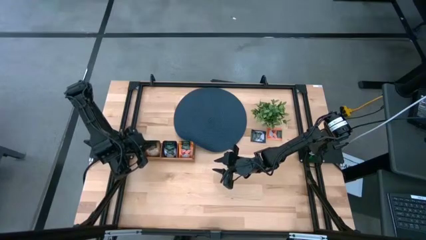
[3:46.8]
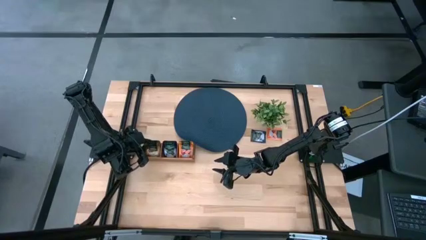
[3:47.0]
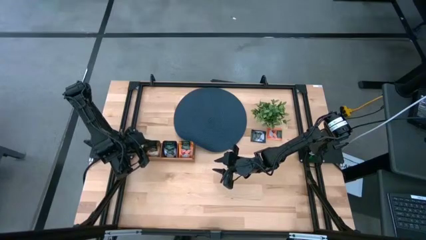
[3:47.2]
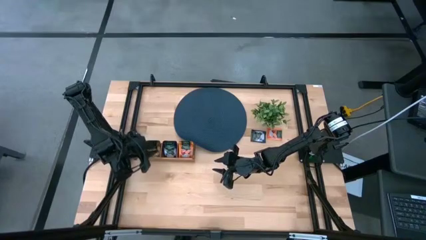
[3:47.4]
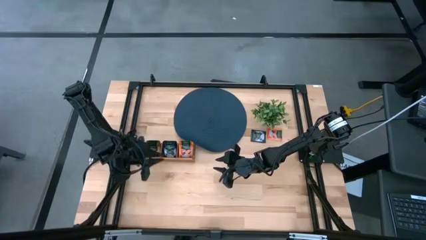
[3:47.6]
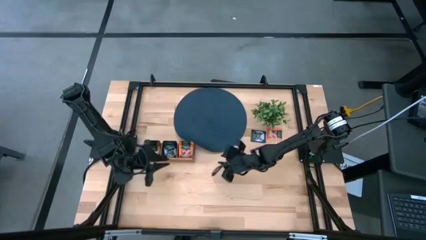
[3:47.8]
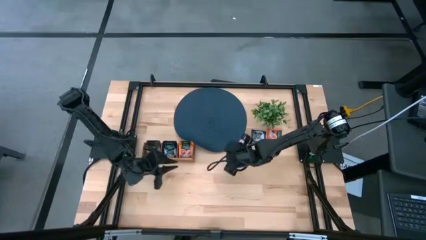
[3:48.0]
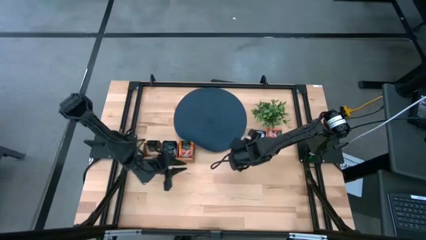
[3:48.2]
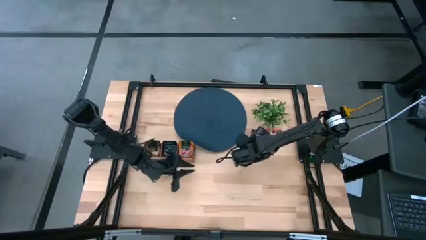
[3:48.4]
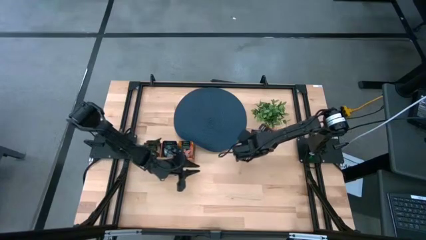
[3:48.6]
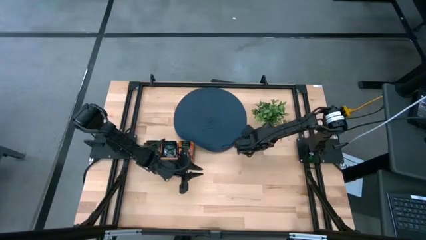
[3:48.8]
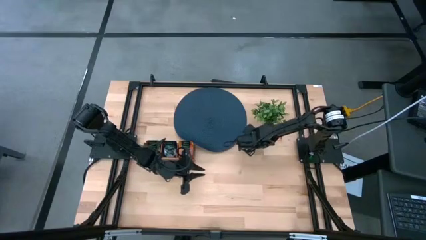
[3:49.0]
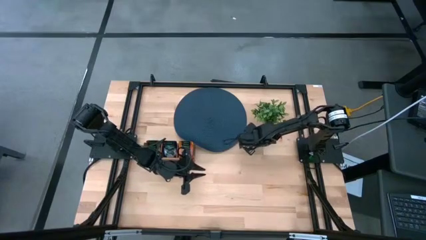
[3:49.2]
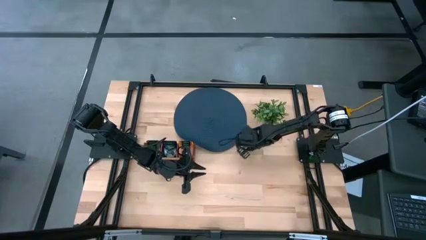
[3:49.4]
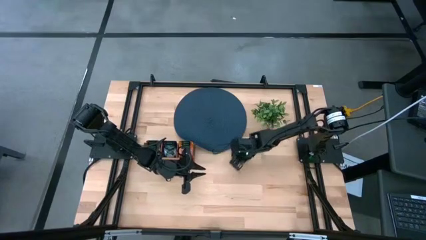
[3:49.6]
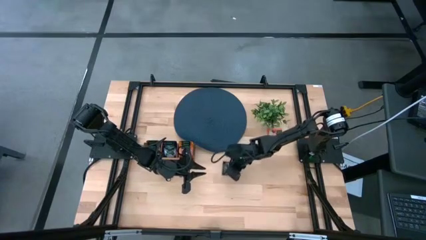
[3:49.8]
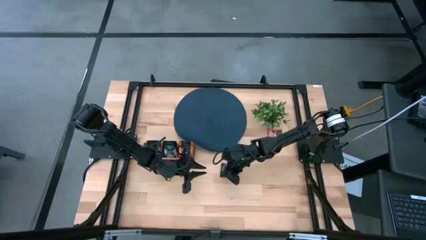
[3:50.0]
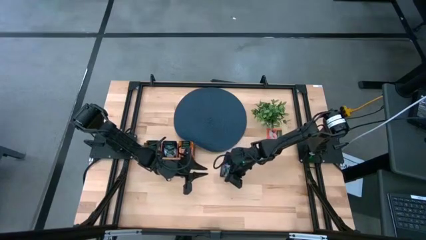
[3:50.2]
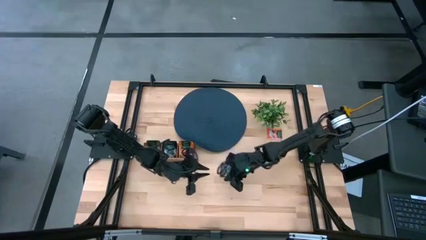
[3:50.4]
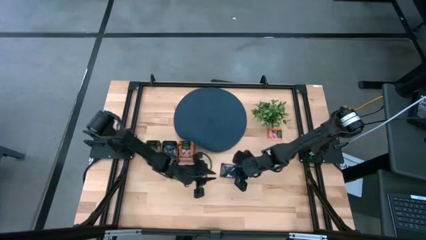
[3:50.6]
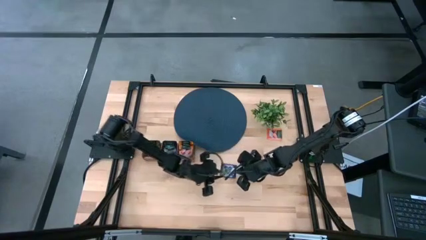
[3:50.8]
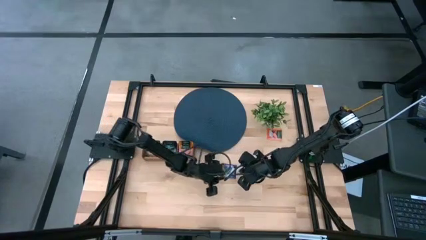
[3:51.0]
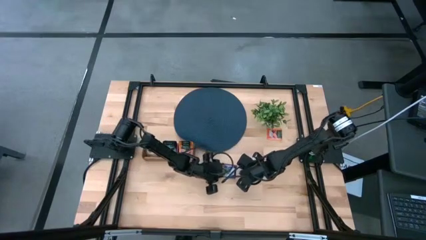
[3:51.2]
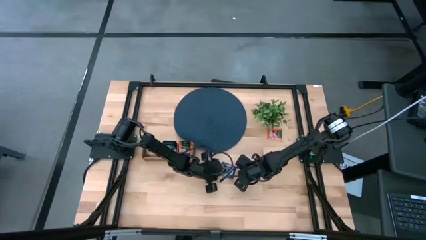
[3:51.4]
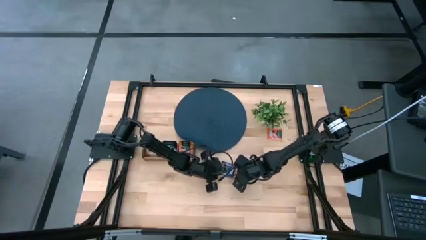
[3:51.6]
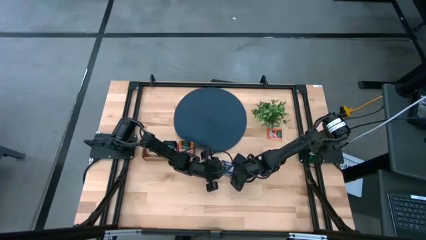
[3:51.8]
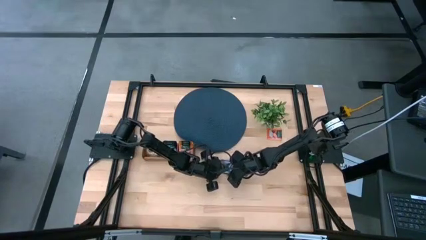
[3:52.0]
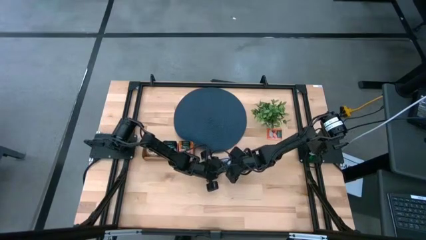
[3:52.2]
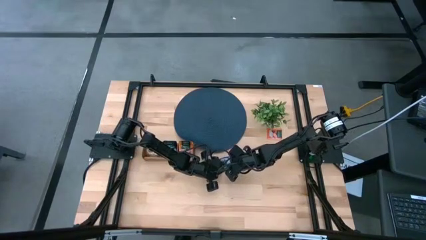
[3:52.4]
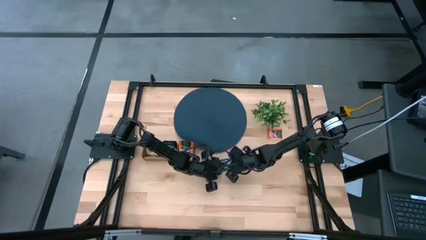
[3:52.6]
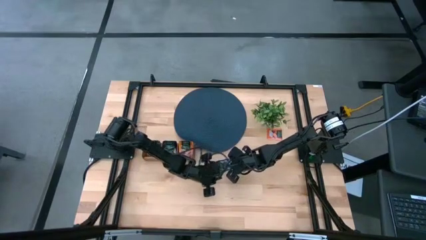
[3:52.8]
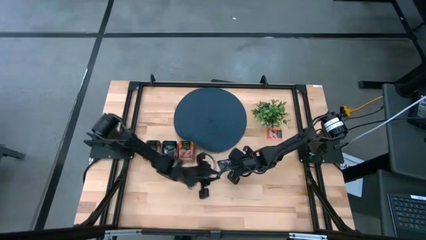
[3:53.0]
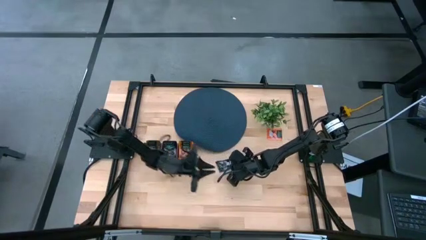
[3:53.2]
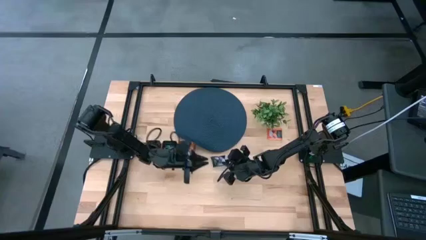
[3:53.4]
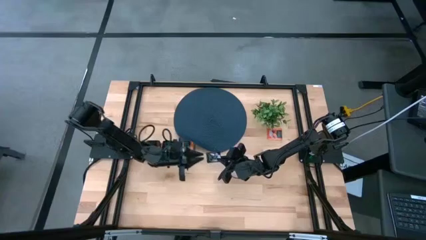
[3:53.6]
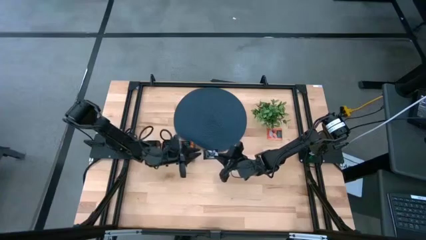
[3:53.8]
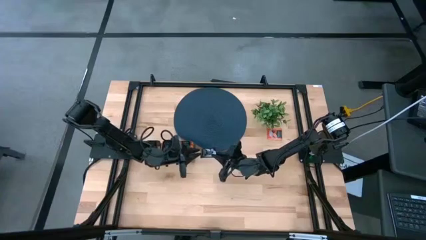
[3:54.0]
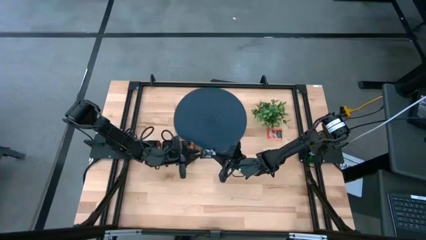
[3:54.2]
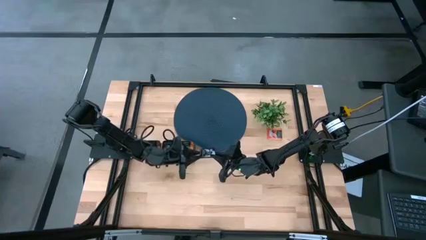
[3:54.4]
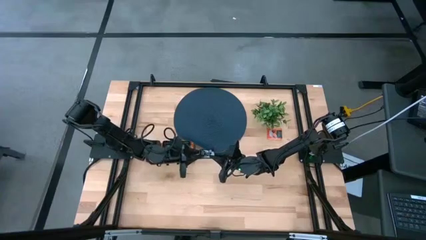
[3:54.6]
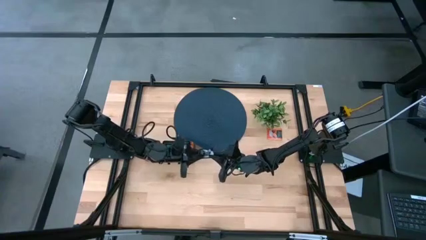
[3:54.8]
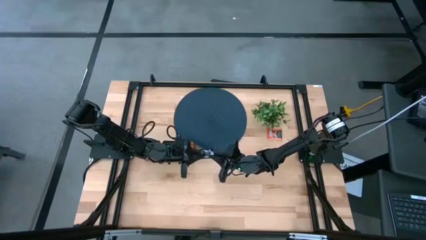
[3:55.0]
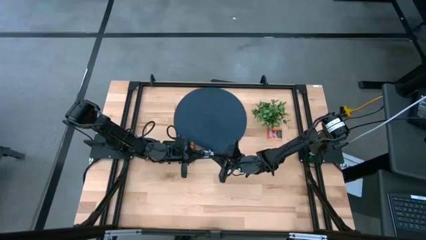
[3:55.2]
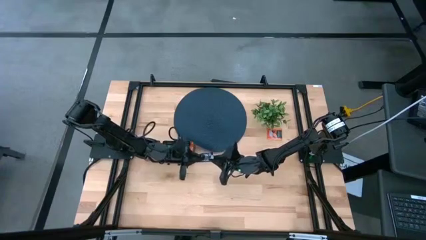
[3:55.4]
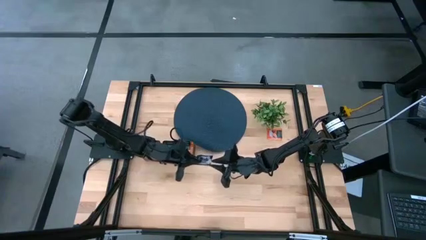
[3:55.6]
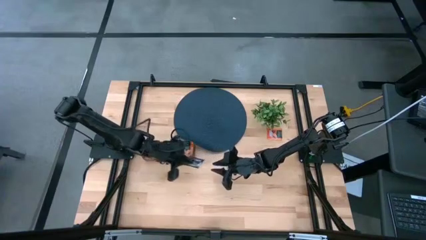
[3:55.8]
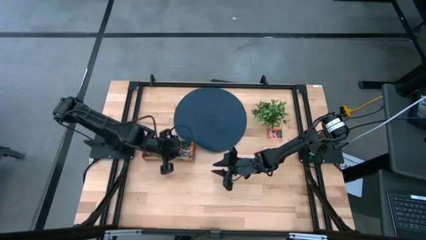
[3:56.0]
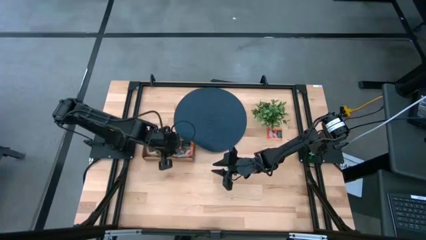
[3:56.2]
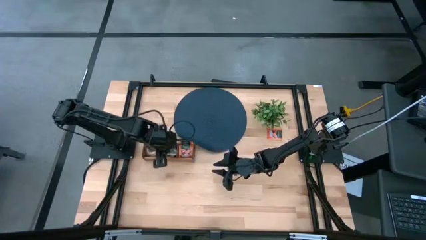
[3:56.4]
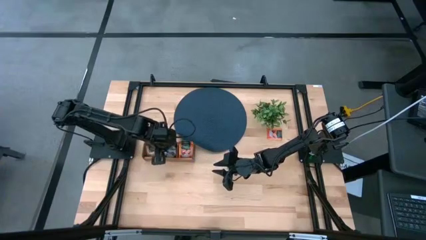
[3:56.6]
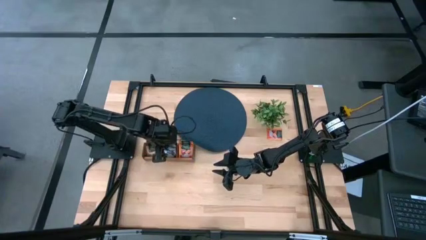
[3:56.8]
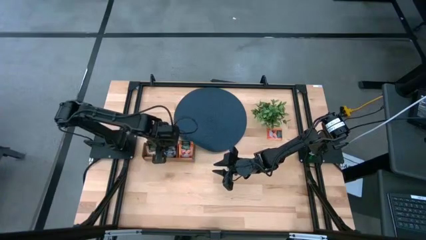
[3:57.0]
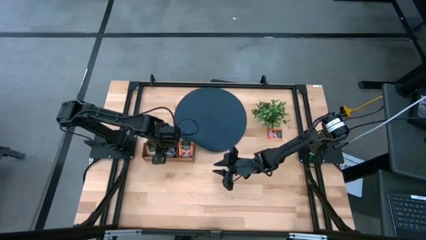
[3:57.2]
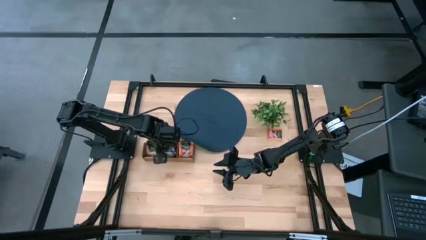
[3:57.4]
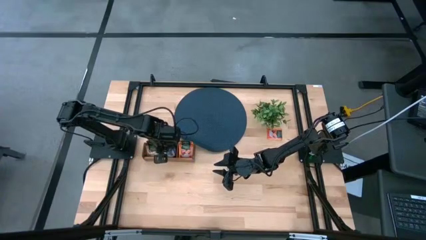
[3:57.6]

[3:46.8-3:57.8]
Task: Pick & Place Tea
Put the blue tea bag into the middle section of the wooden organizer

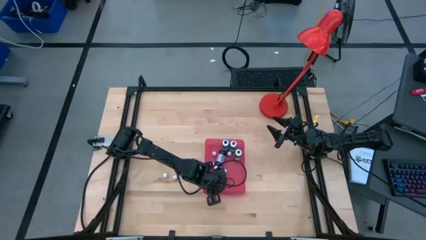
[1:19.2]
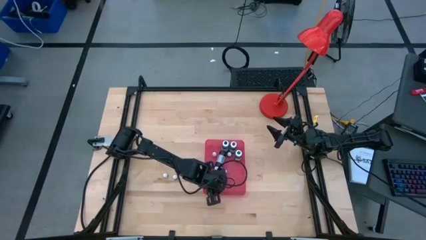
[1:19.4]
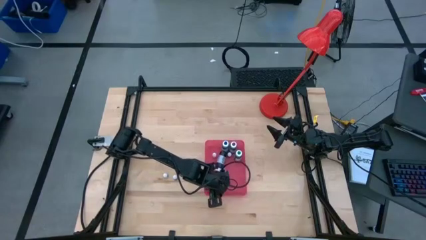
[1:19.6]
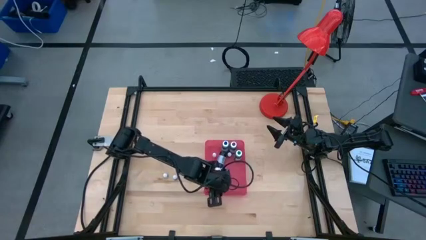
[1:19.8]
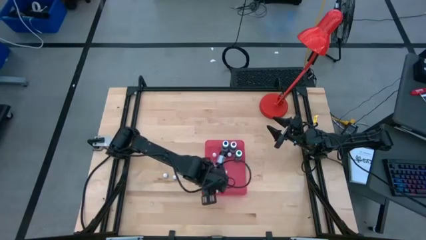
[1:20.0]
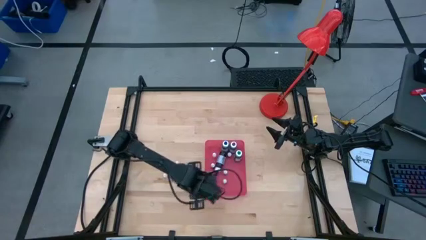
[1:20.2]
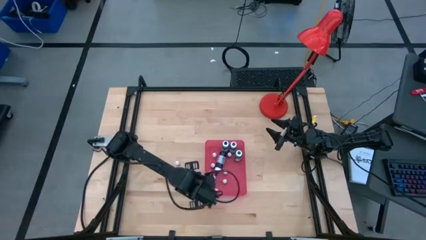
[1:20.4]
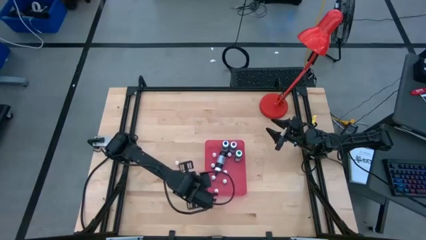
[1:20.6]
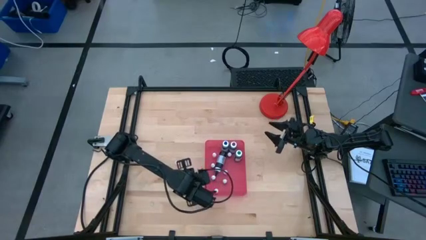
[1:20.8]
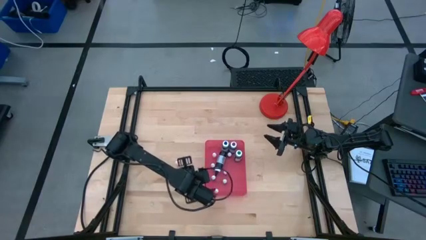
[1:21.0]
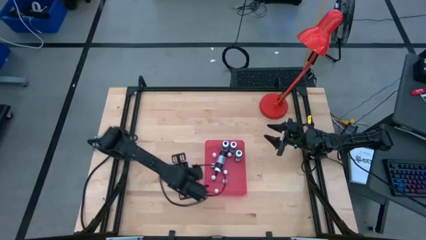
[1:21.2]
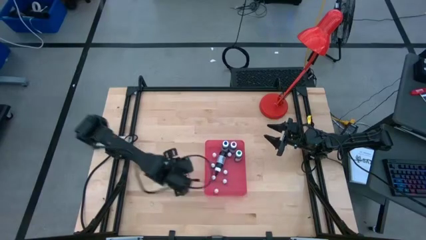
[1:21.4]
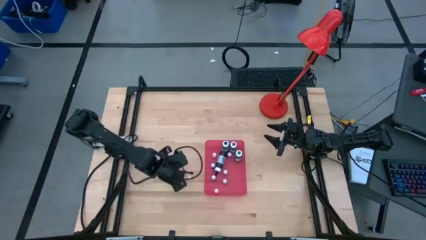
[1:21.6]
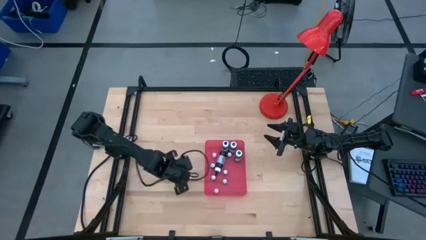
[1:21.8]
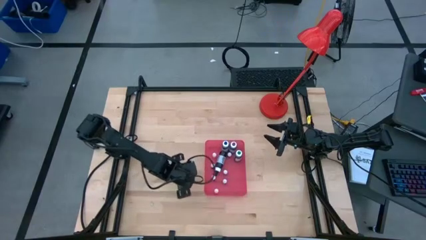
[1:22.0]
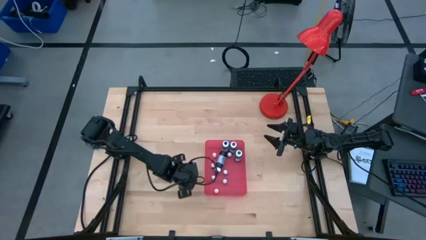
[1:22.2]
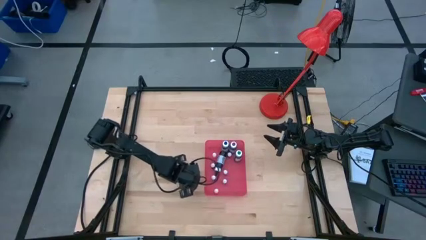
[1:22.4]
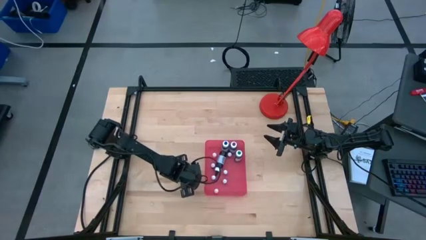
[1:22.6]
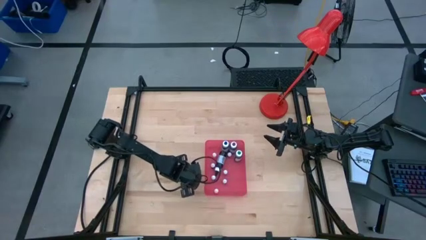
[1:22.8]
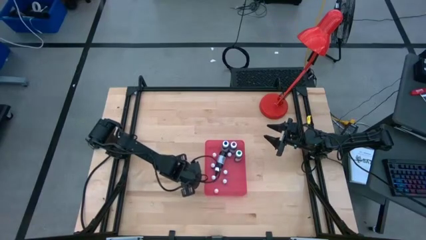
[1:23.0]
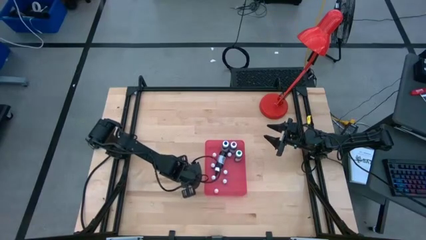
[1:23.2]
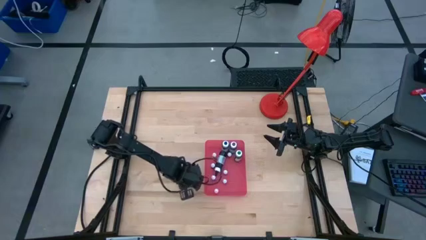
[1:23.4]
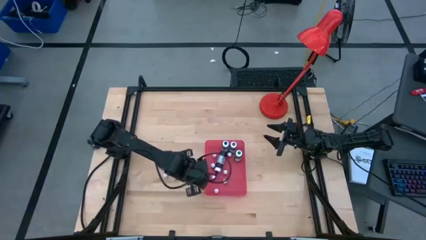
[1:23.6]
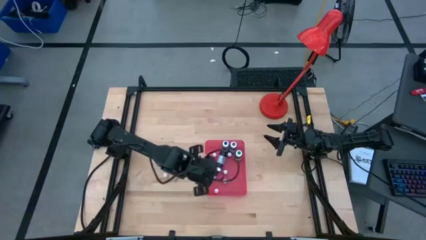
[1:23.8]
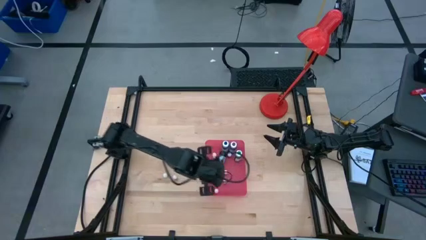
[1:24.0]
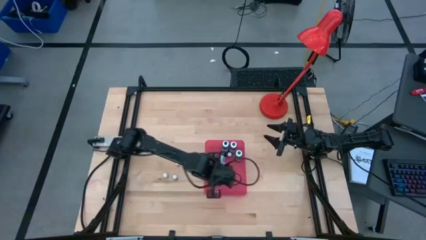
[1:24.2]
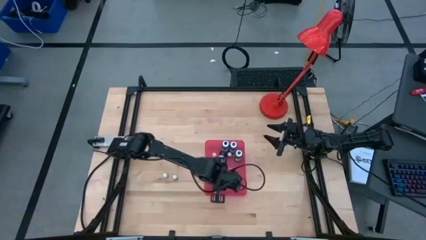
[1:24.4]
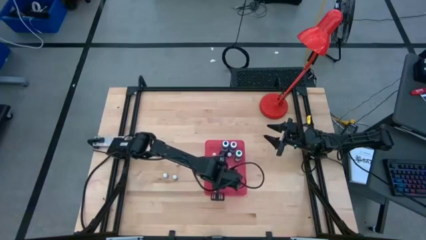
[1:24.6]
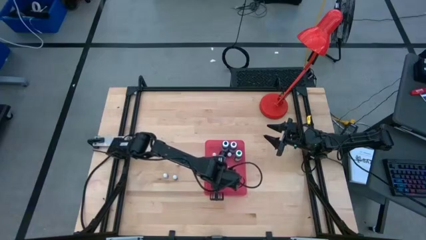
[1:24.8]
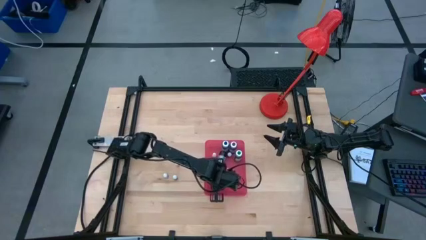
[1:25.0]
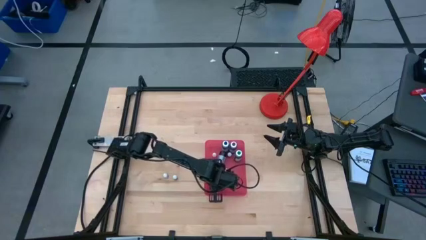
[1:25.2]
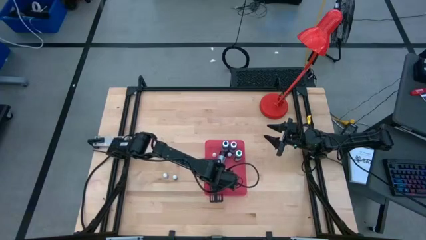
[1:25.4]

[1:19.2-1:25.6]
Task: Pick & Place food coloring
Put the small orange food coloring bottle into the red bin
